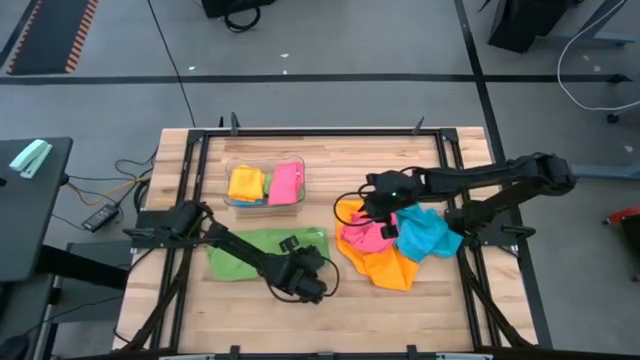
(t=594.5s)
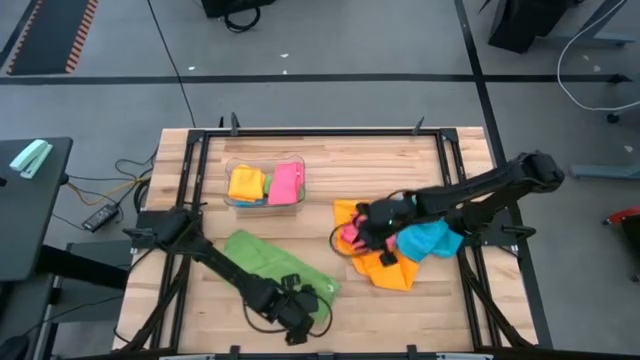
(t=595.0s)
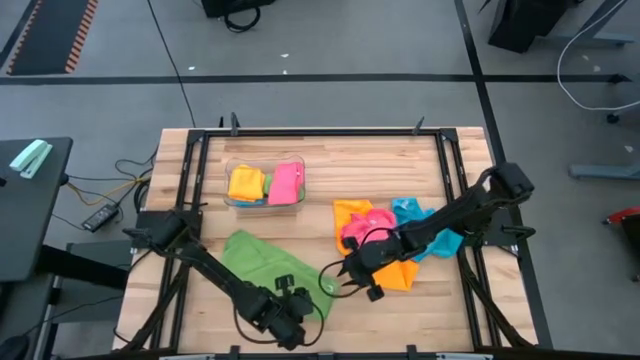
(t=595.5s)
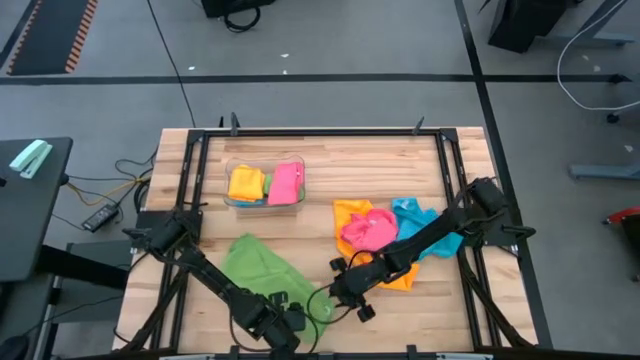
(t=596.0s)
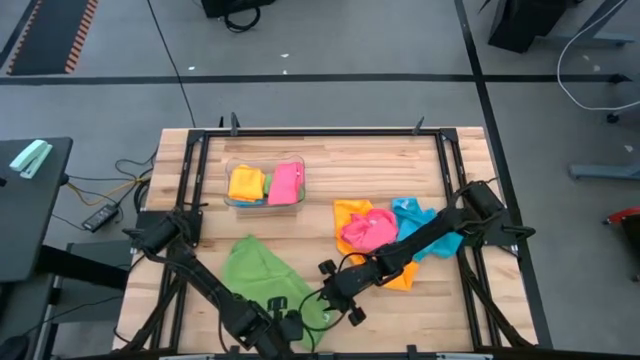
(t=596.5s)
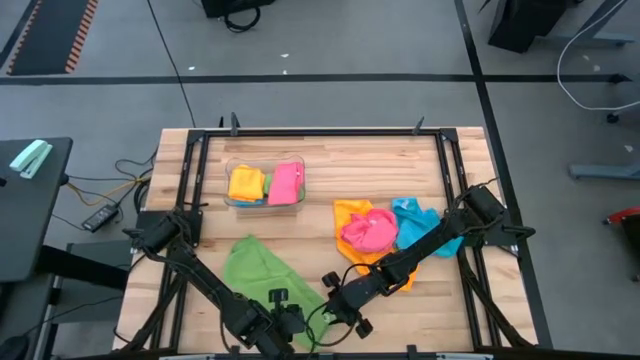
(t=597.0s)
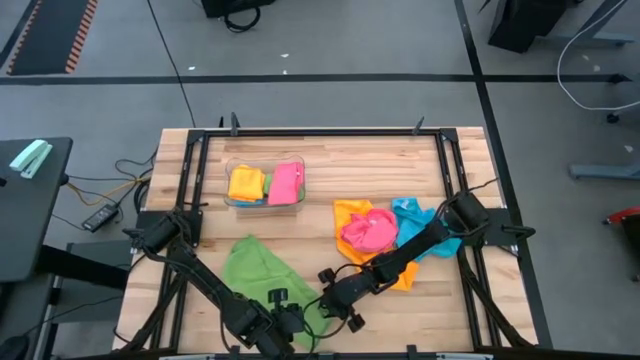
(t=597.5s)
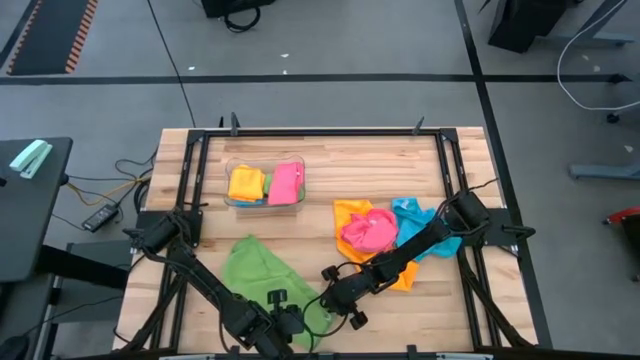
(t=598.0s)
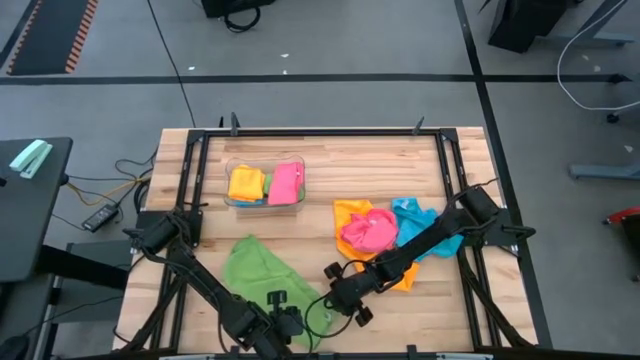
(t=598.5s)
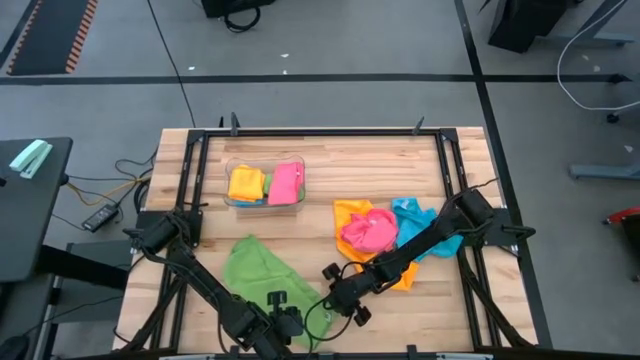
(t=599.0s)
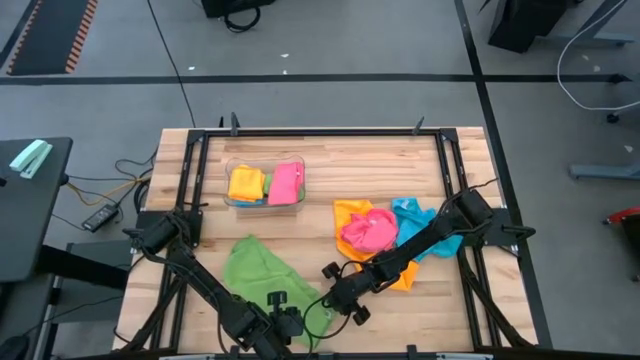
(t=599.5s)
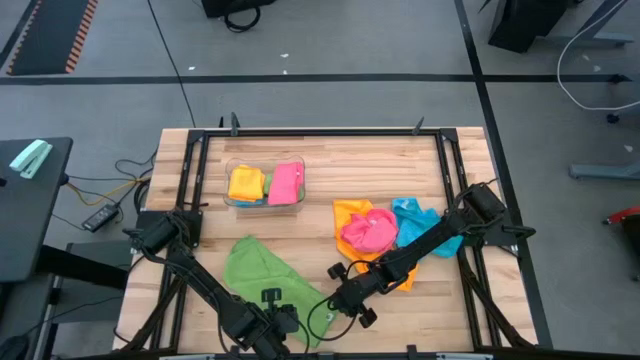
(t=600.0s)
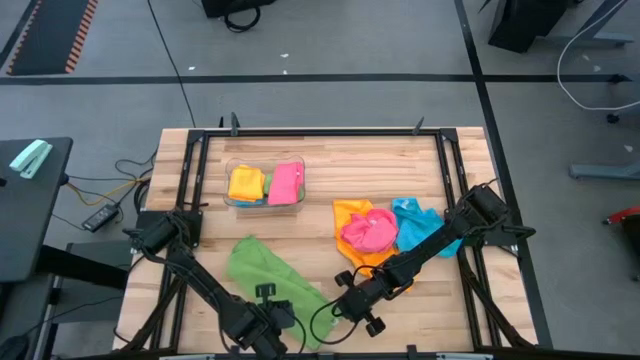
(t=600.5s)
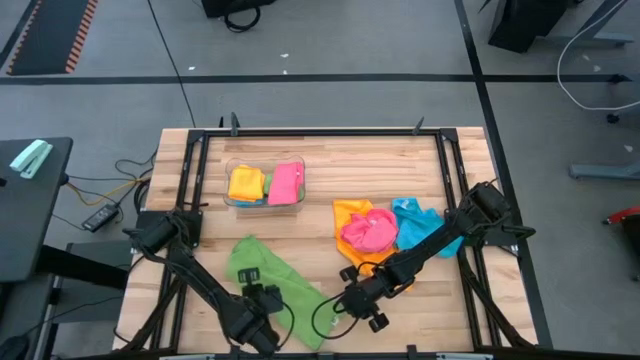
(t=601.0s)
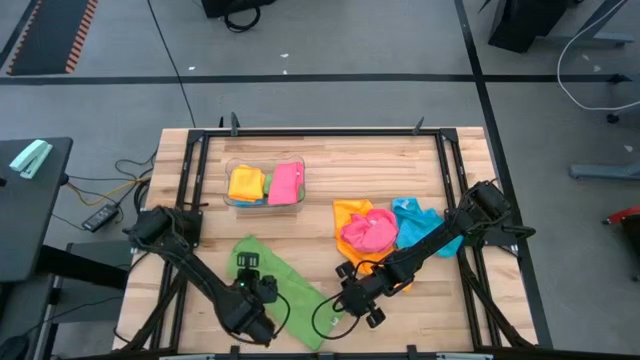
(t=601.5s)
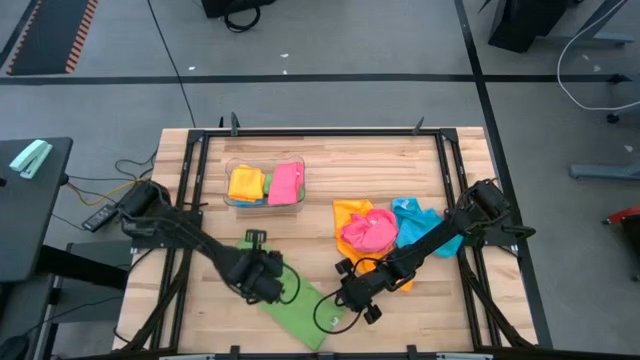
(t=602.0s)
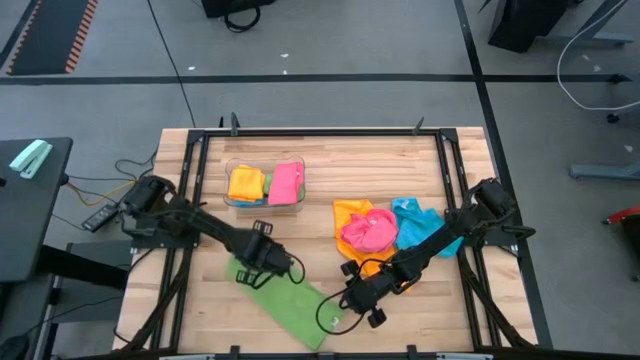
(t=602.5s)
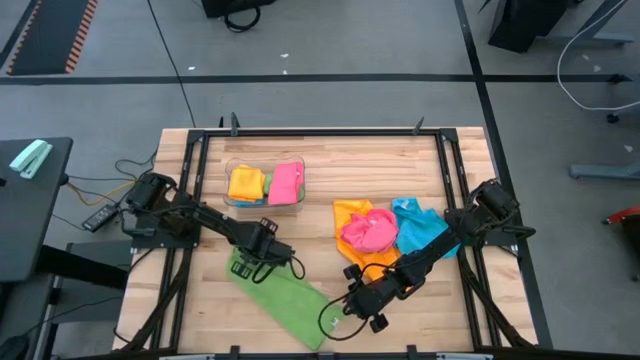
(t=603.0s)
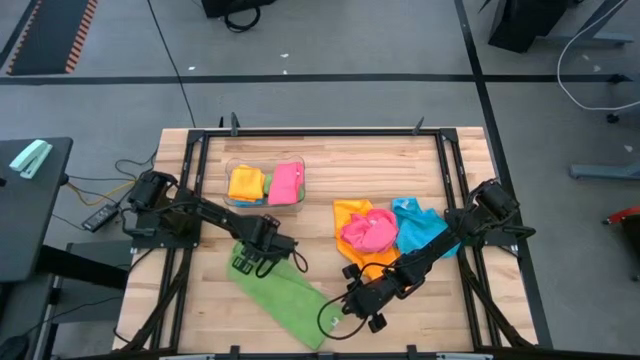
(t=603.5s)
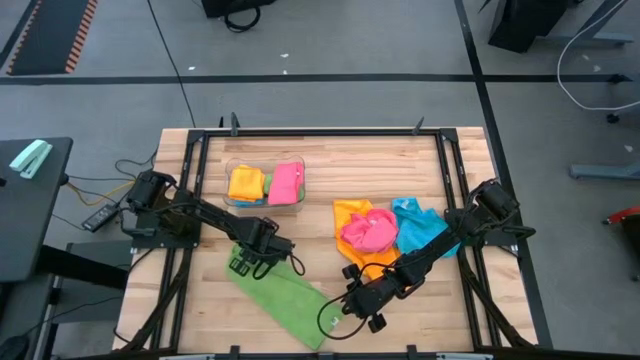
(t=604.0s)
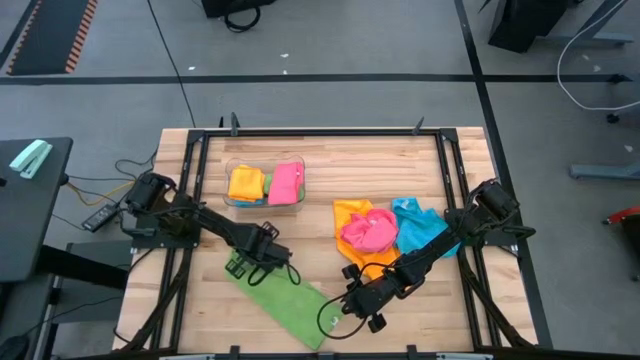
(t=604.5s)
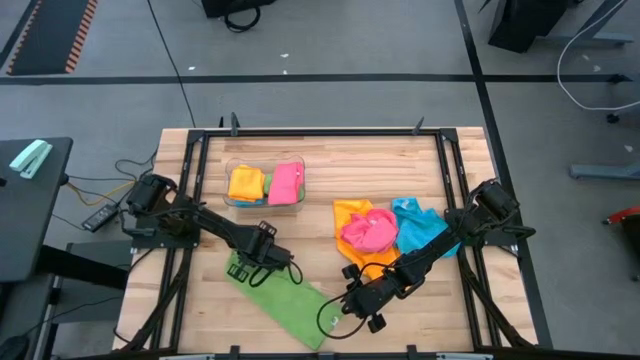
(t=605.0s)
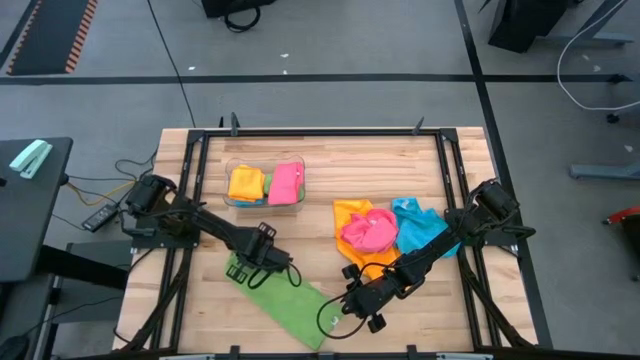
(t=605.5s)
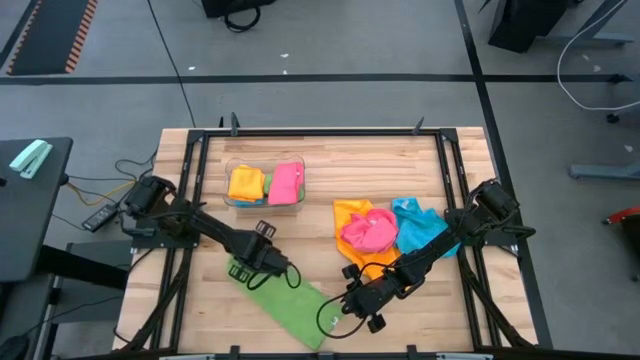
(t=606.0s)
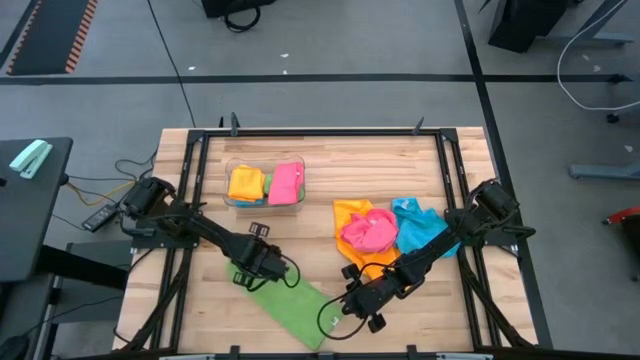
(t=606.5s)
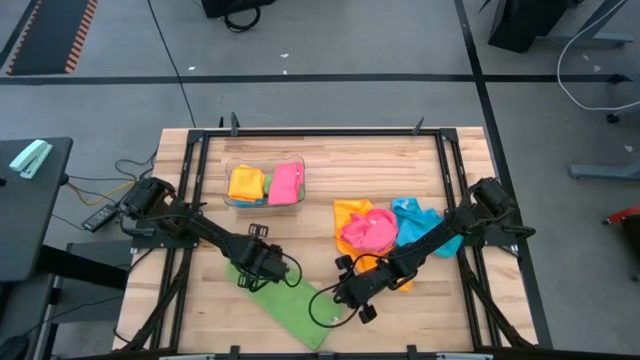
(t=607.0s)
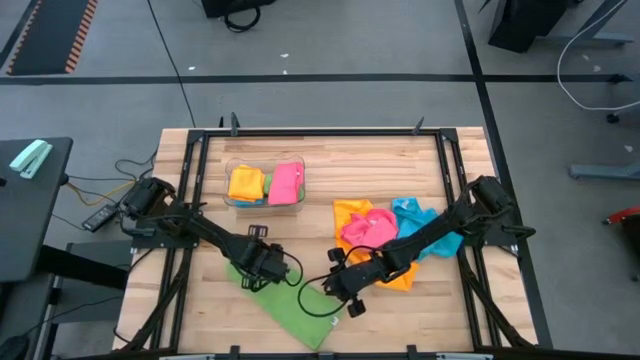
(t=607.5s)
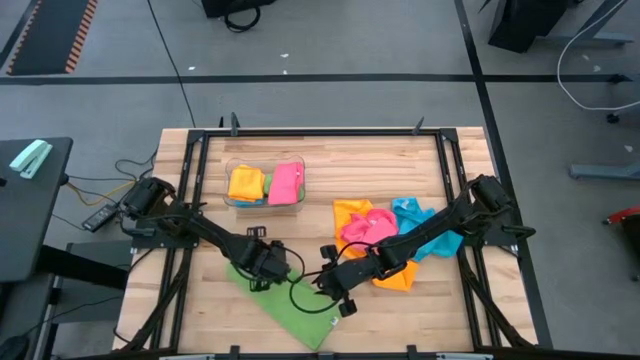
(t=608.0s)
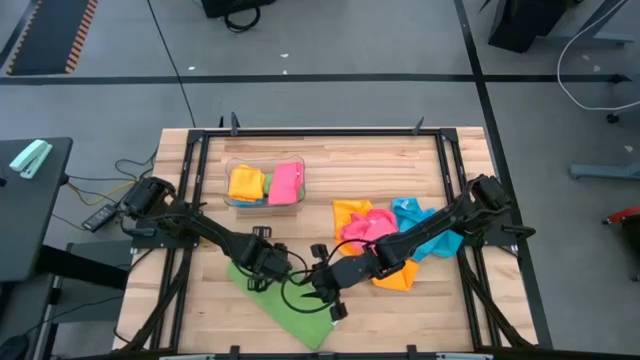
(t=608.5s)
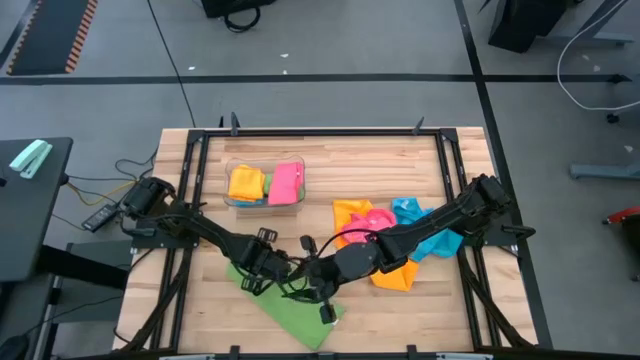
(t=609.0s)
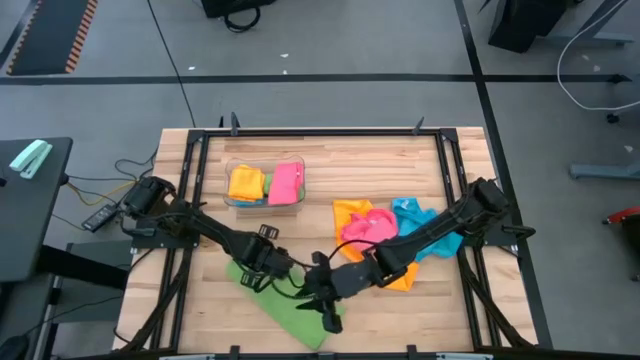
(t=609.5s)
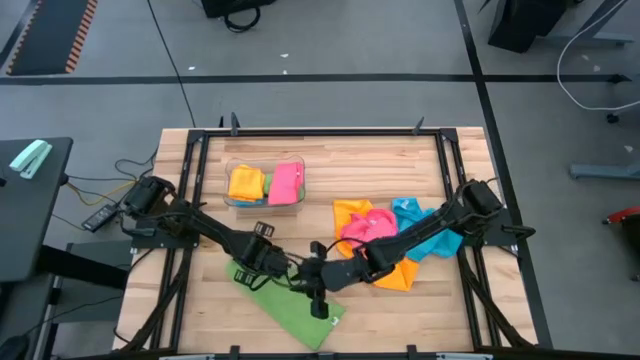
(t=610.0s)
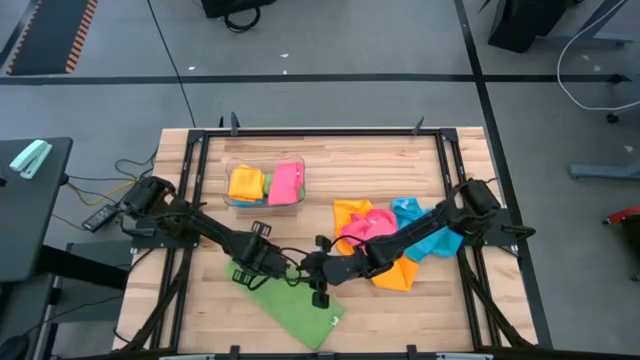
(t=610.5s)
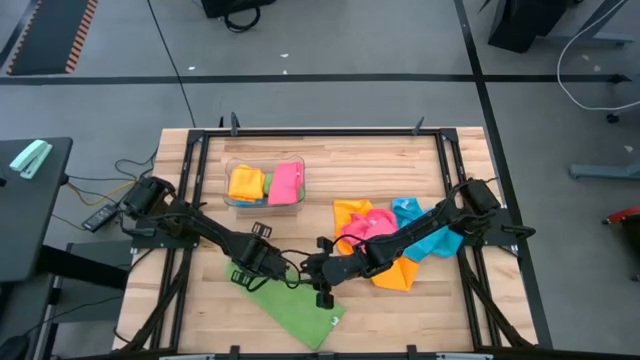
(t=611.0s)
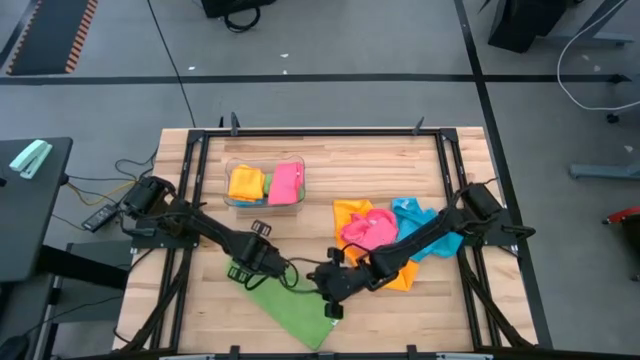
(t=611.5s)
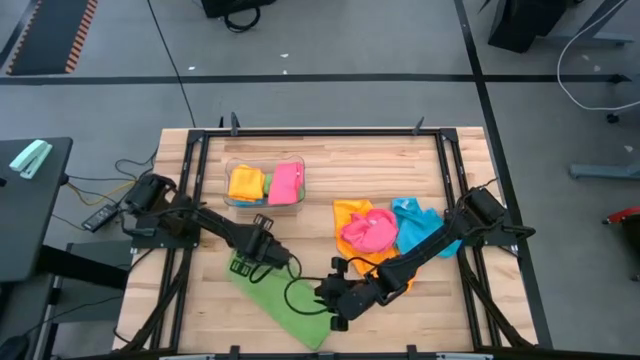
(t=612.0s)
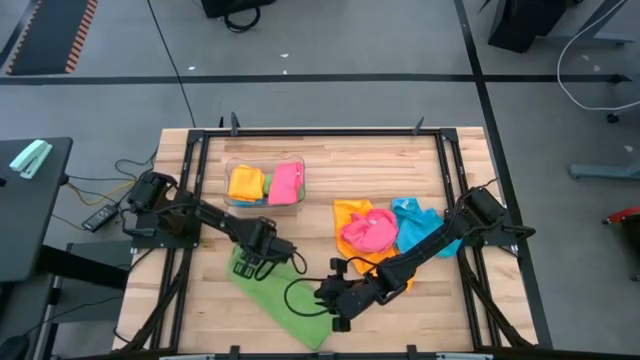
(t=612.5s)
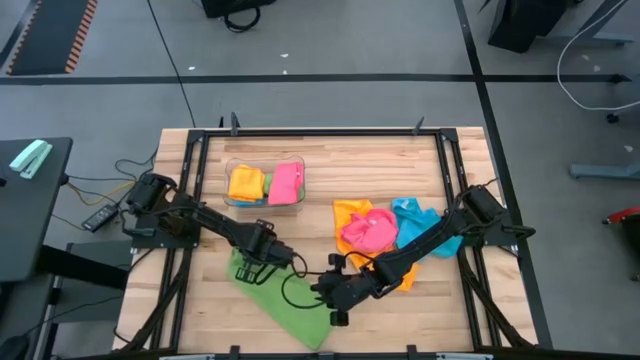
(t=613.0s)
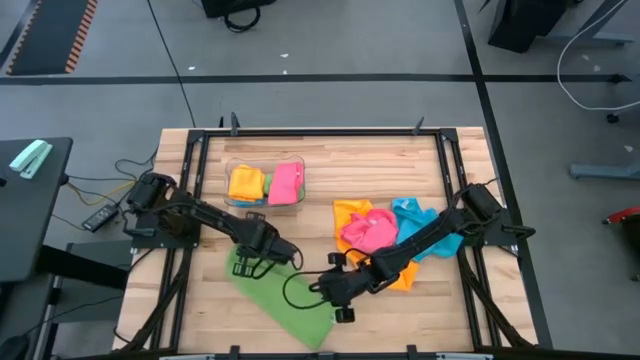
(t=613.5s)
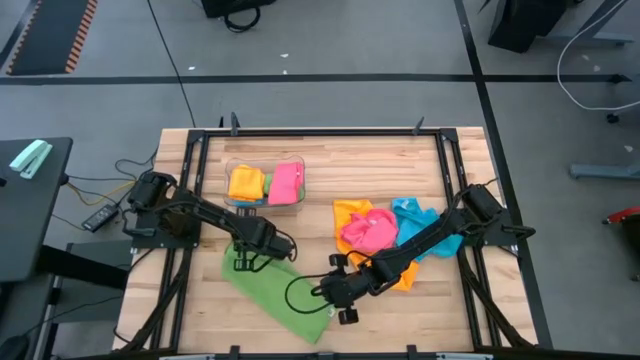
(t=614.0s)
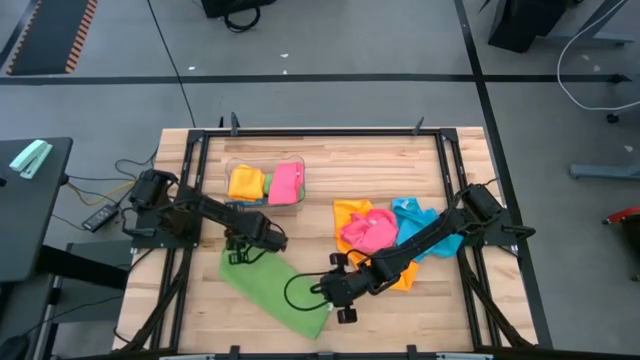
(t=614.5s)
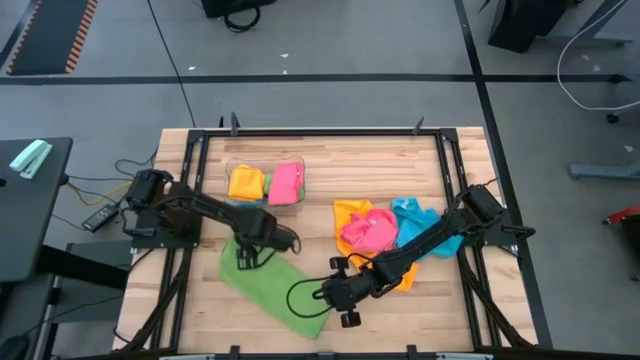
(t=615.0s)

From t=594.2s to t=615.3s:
Task: Fold microfiber towels
Fold the green microfiber towel
